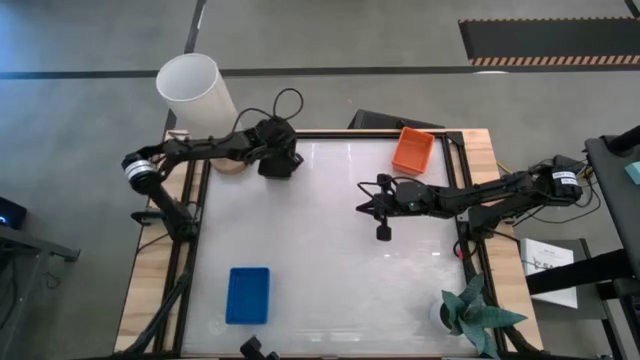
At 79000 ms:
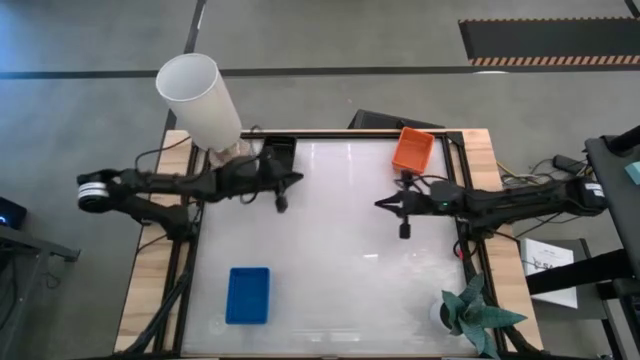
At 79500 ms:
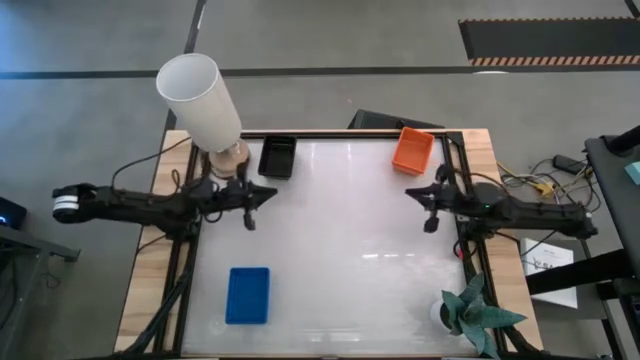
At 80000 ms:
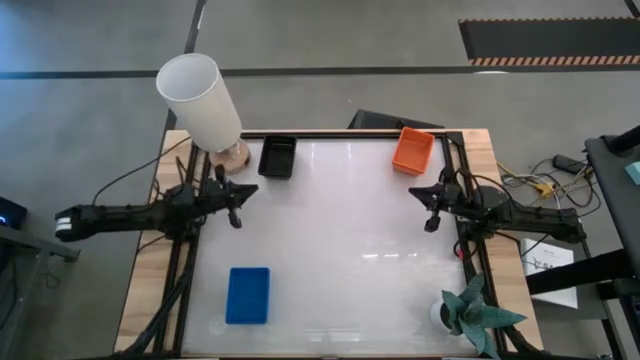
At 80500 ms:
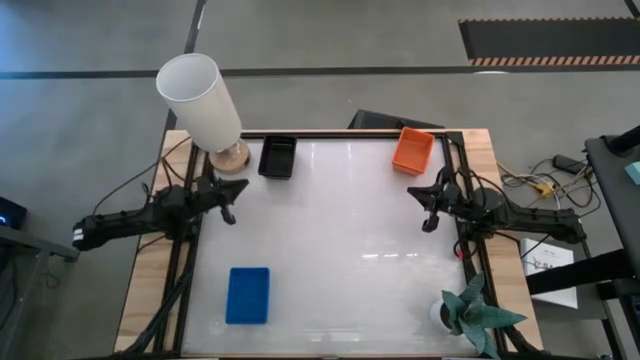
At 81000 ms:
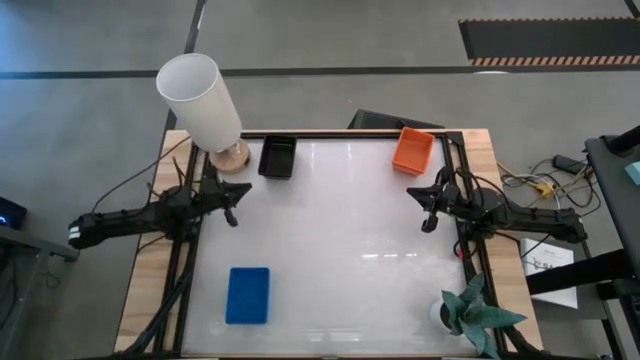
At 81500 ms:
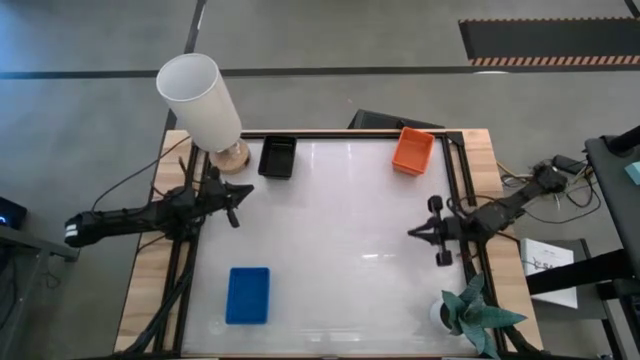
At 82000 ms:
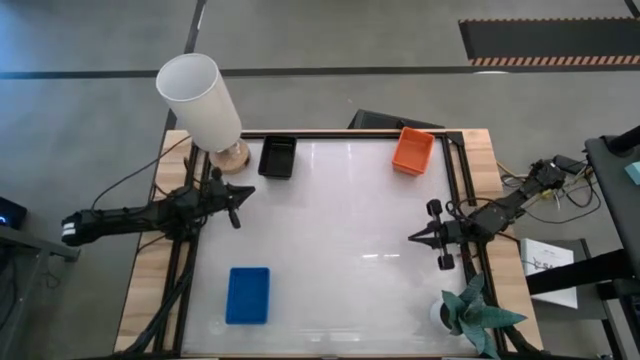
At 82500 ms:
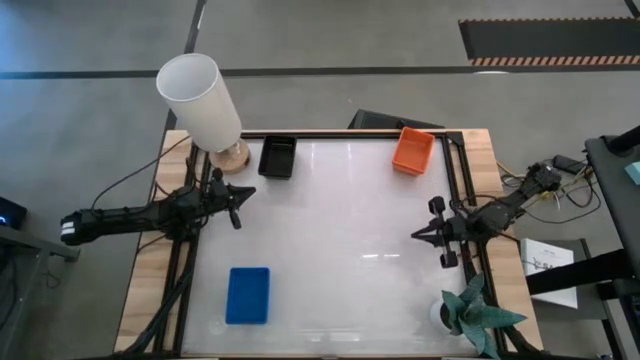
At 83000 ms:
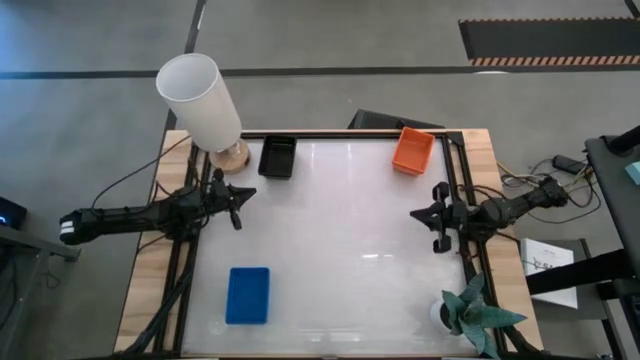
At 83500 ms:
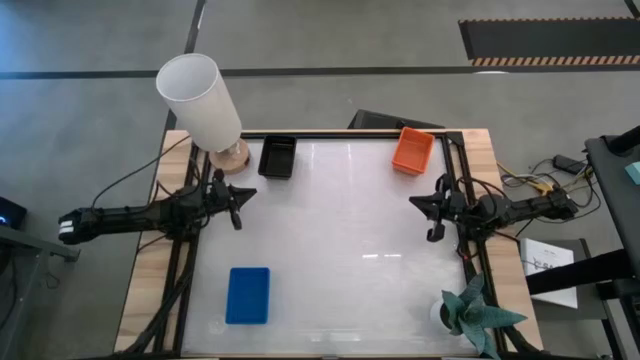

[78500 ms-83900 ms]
Return to Home Position

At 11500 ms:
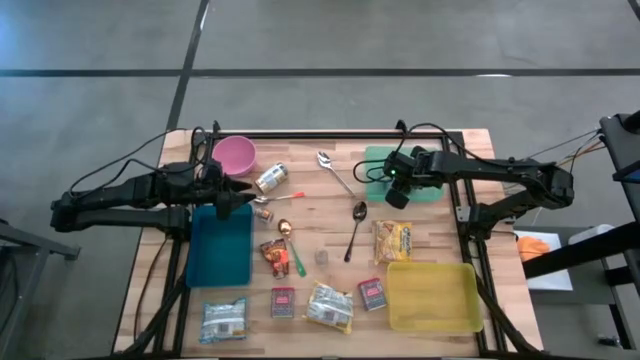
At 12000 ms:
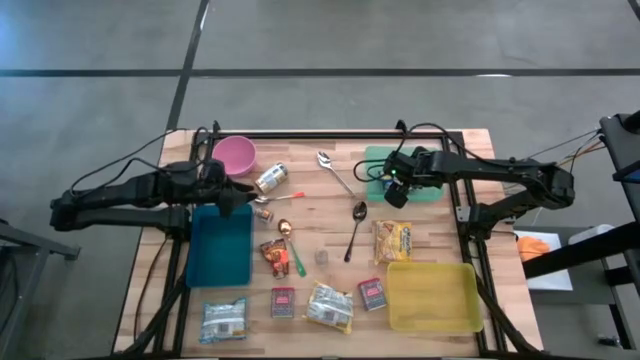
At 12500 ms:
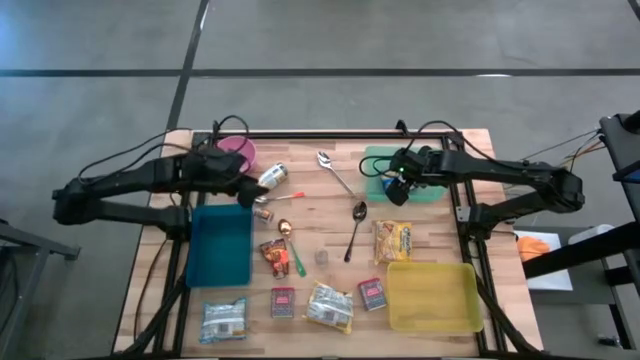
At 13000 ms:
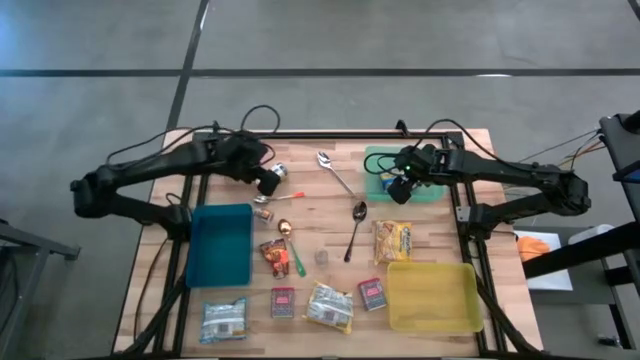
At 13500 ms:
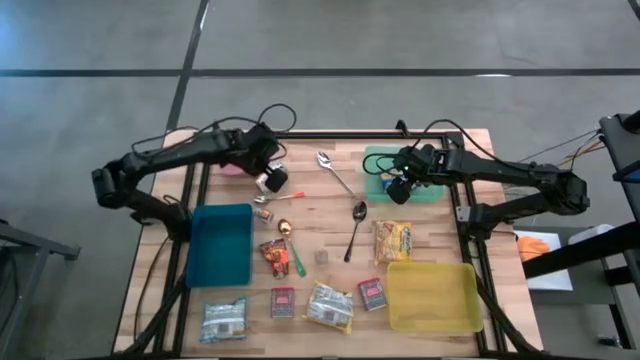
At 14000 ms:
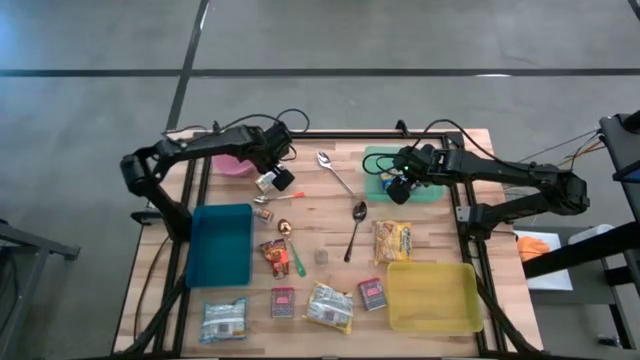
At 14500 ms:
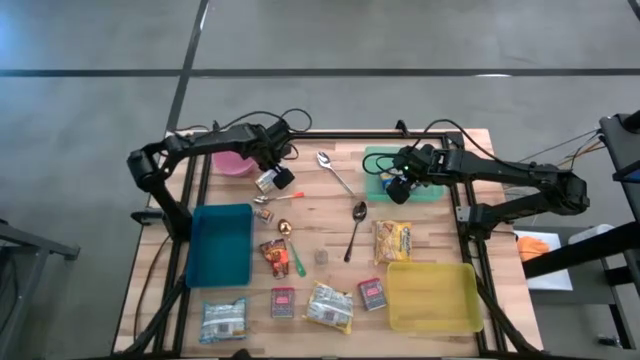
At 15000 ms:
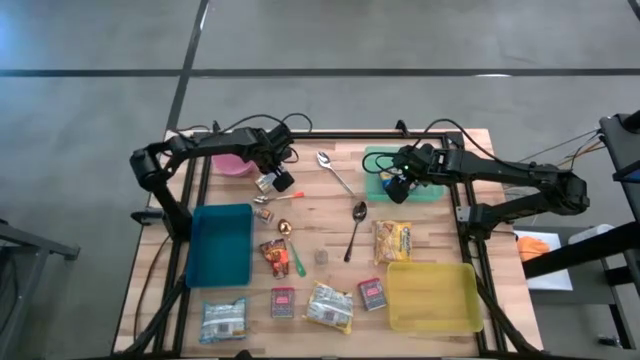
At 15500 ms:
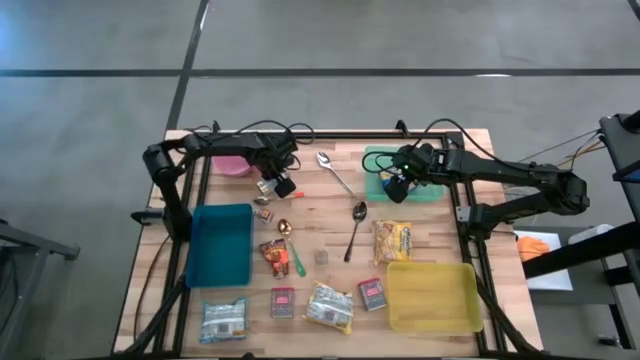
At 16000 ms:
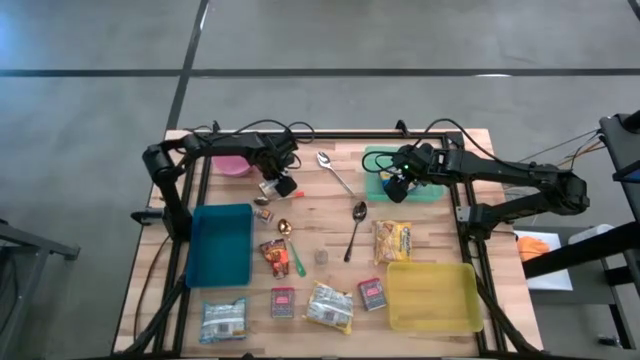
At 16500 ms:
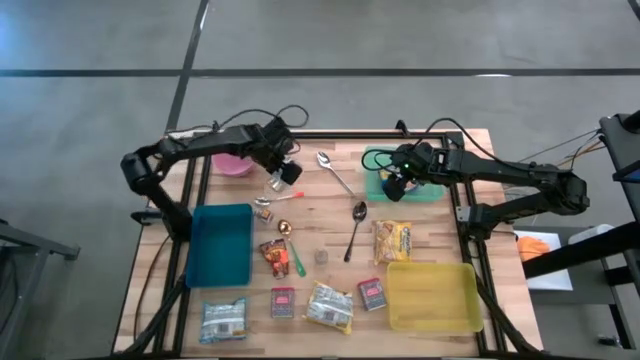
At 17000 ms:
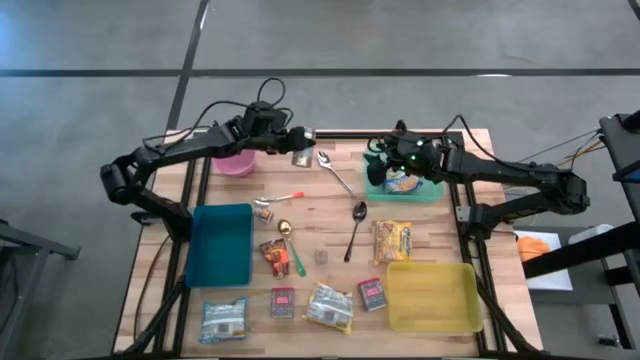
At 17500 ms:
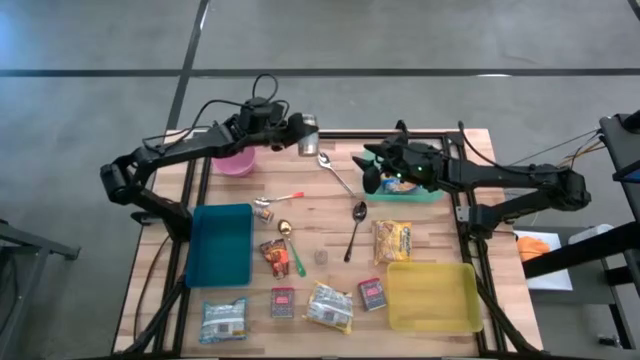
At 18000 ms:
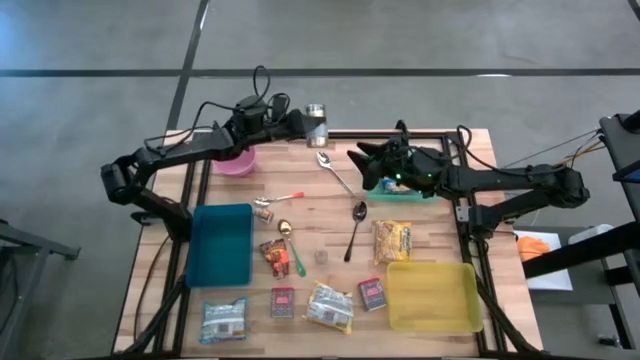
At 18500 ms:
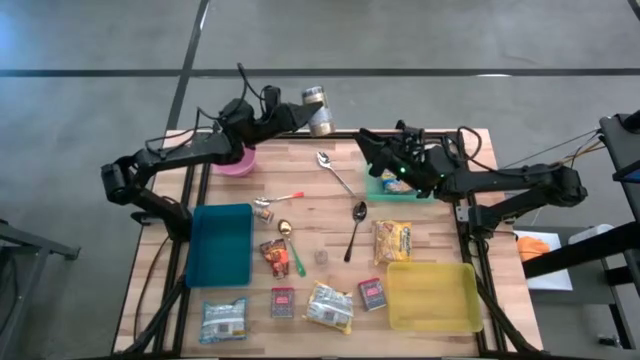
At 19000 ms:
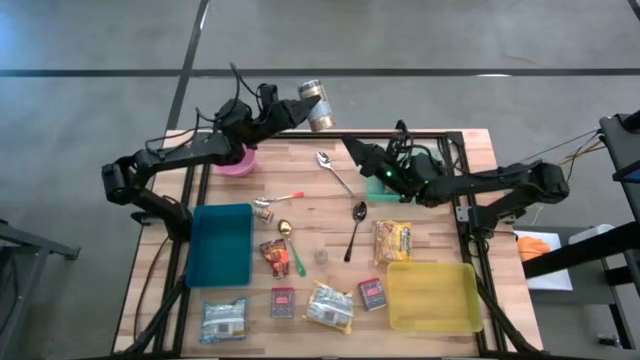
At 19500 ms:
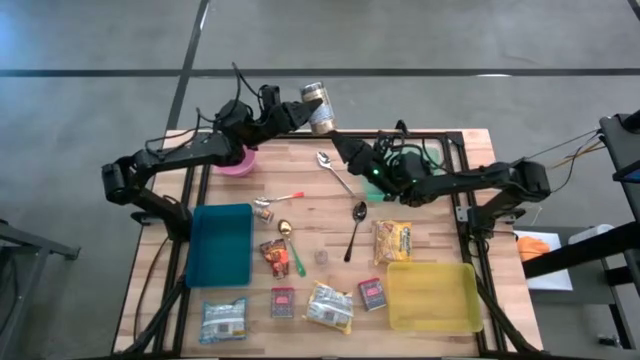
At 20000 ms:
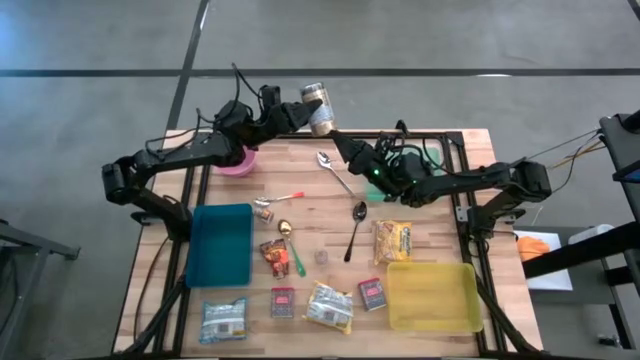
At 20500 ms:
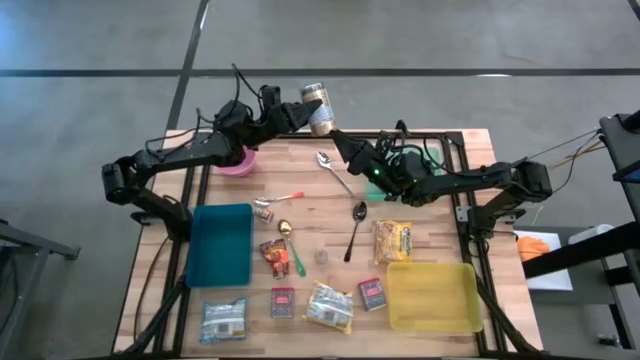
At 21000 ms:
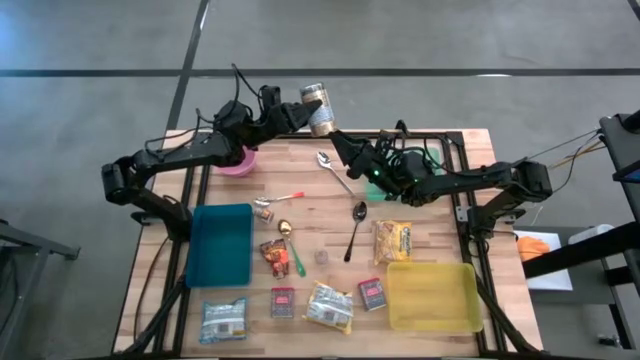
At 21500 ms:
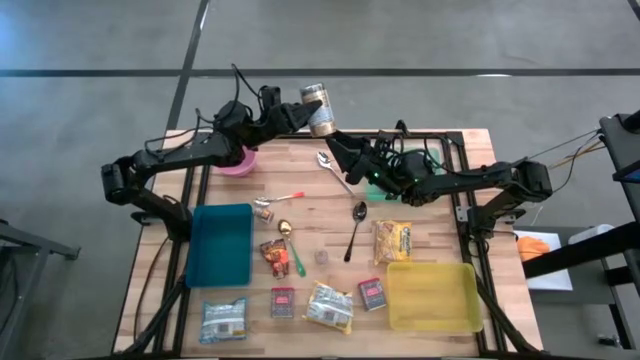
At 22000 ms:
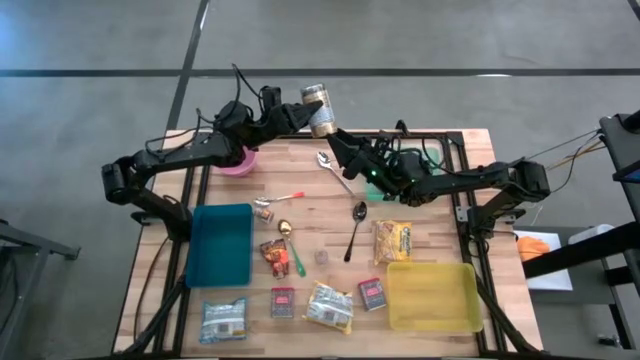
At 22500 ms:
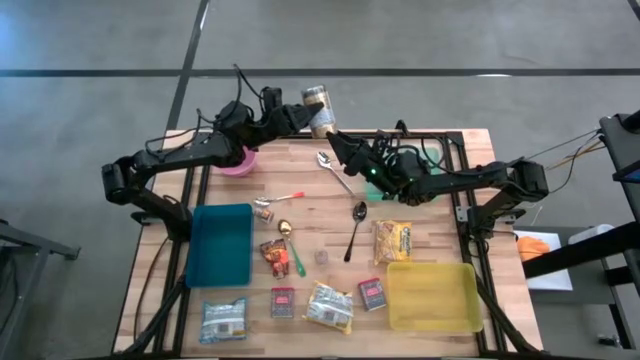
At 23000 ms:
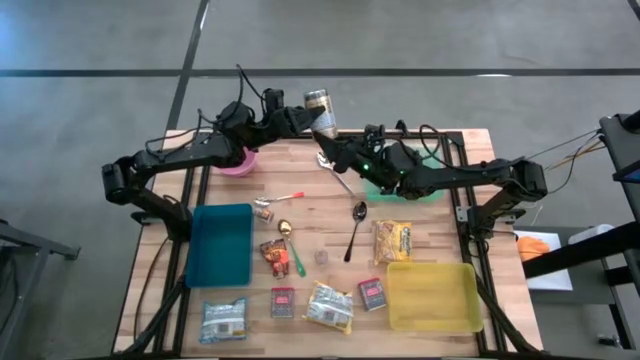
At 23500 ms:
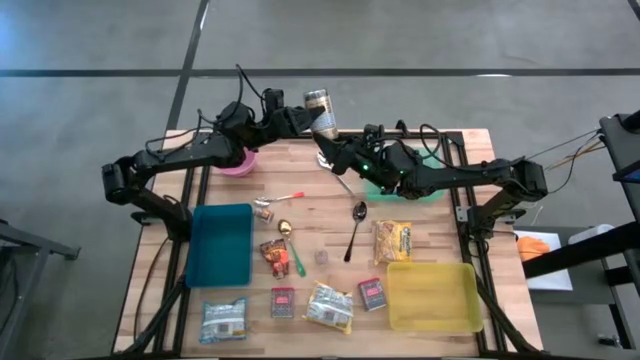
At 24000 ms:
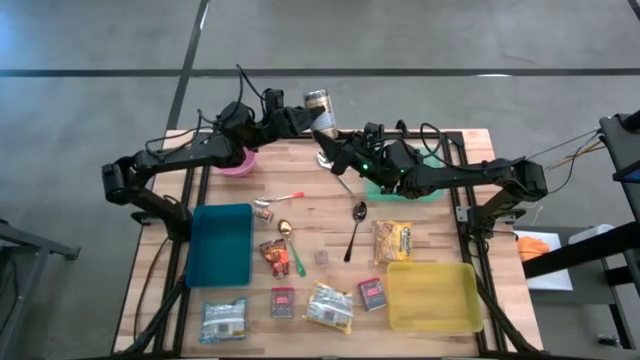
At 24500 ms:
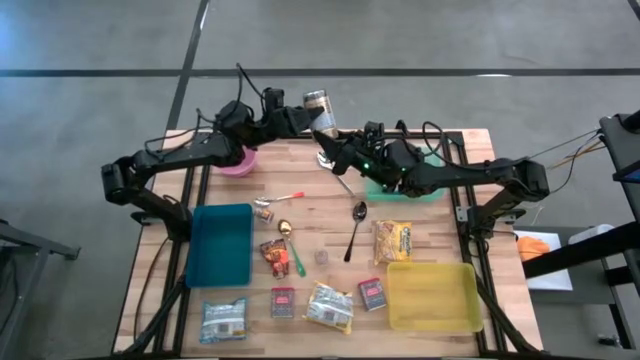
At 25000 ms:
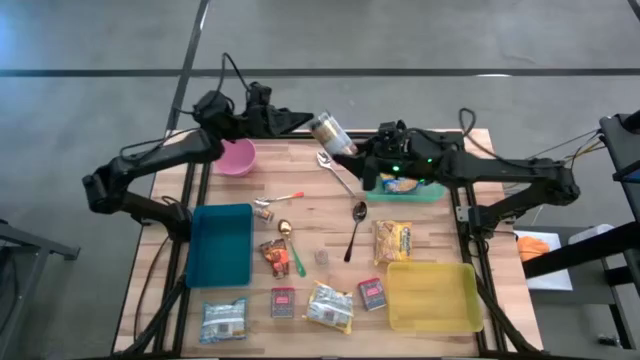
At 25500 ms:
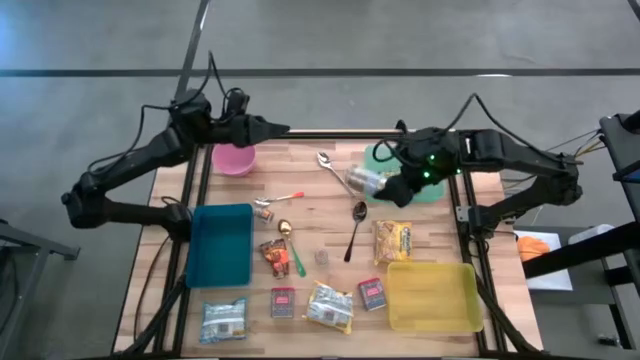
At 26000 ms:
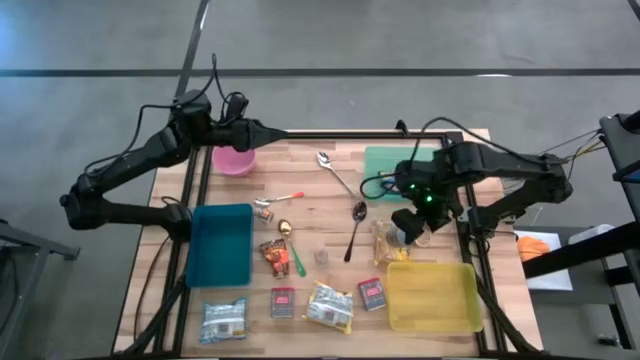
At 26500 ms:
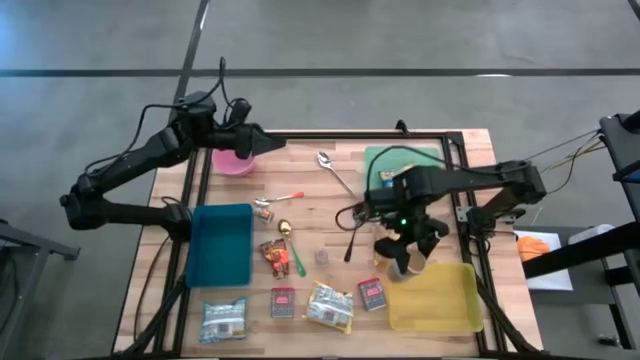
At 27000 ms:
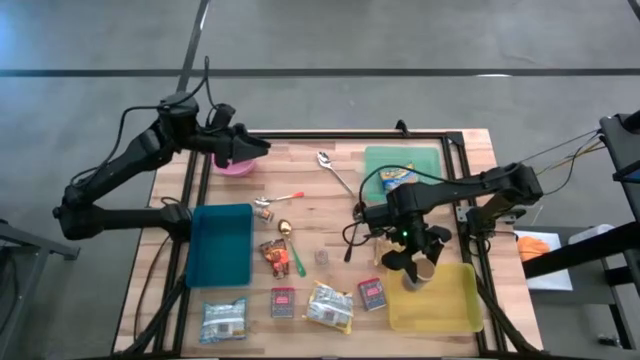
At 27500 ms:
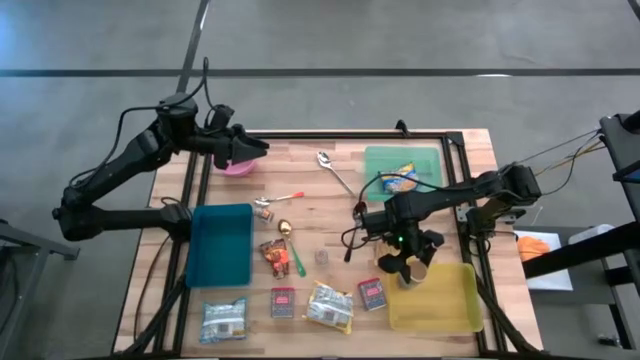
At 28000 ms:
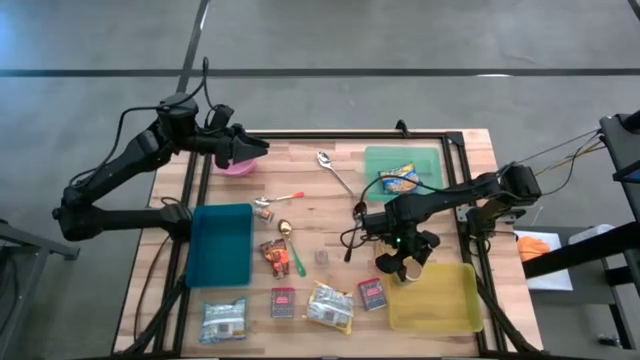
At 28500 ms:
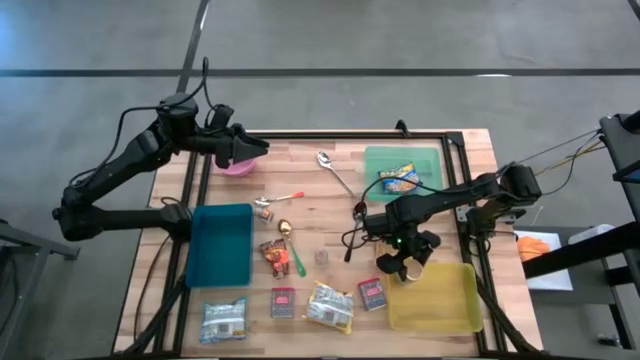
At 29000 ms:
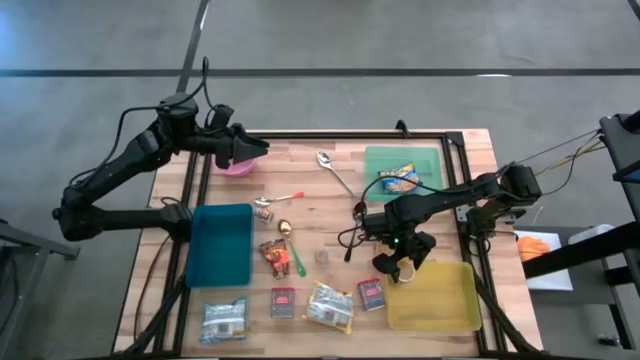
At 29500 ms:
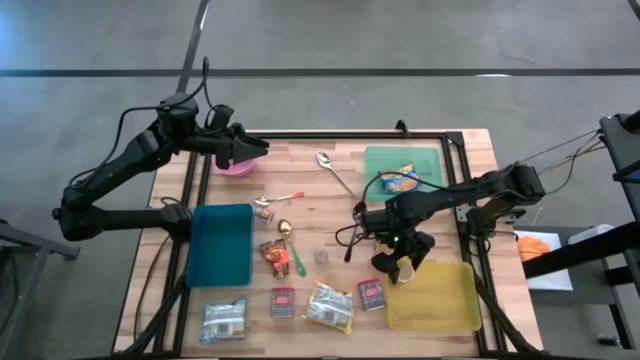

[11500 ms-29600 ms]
Put the golden spice bottle into the yellow bin
